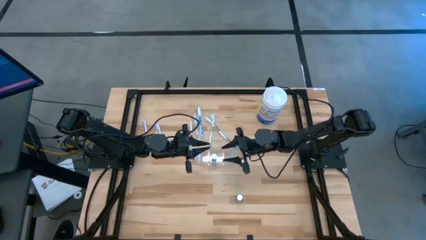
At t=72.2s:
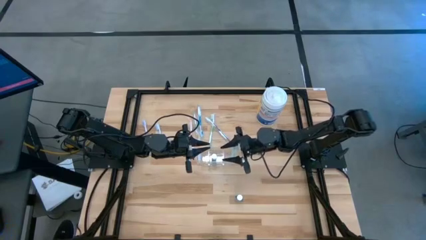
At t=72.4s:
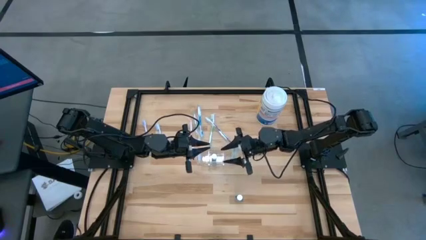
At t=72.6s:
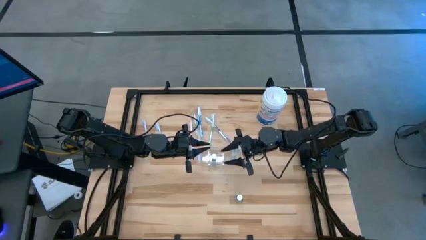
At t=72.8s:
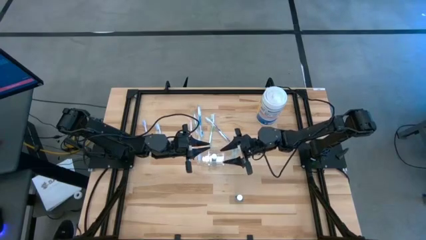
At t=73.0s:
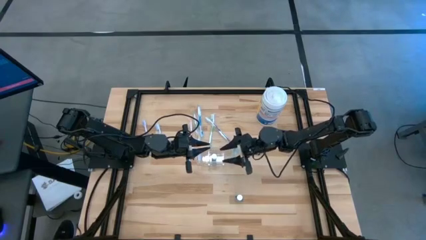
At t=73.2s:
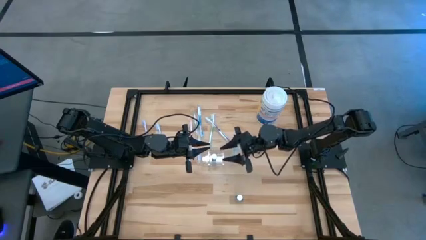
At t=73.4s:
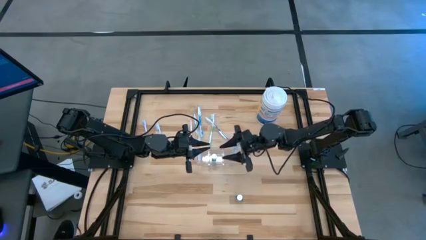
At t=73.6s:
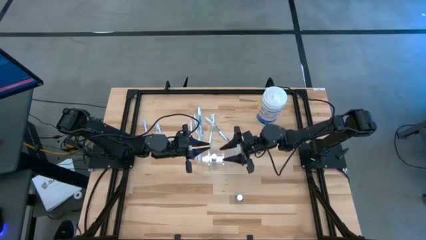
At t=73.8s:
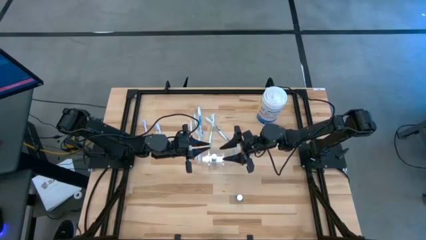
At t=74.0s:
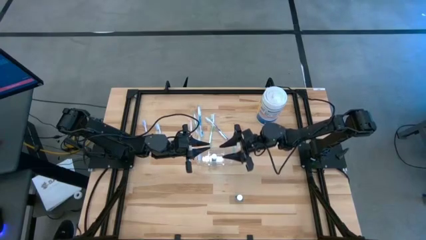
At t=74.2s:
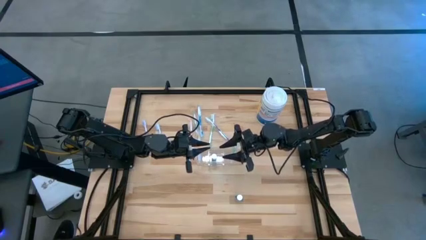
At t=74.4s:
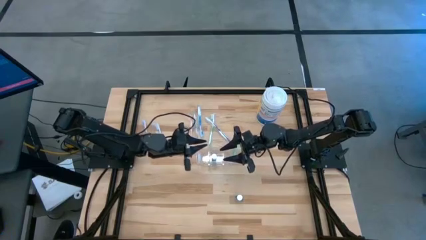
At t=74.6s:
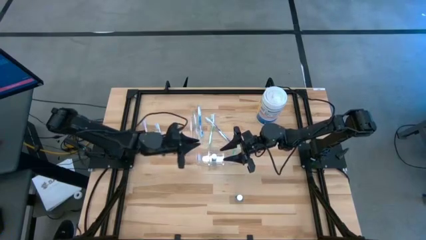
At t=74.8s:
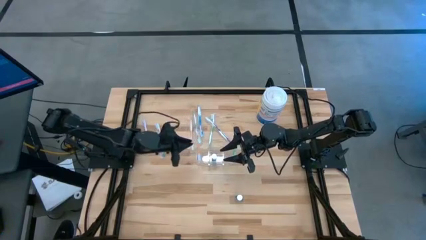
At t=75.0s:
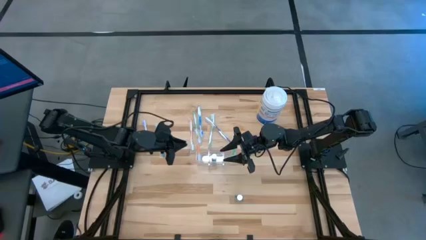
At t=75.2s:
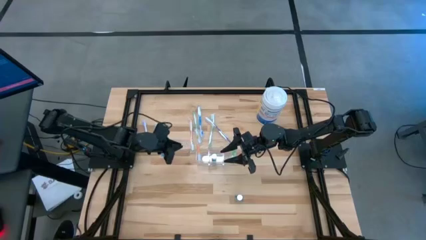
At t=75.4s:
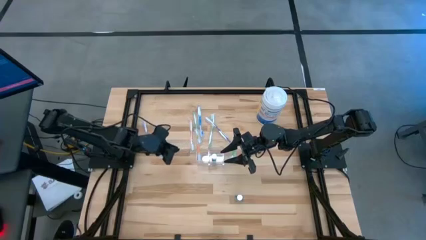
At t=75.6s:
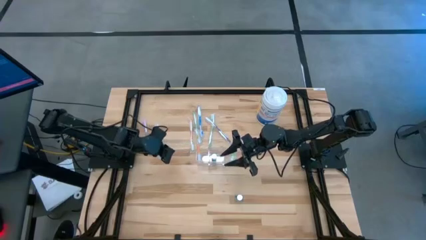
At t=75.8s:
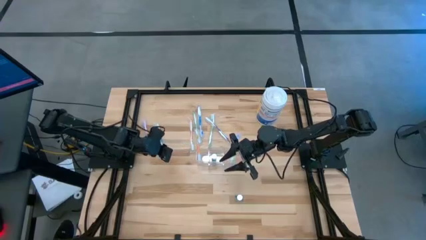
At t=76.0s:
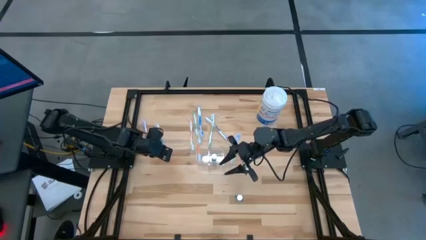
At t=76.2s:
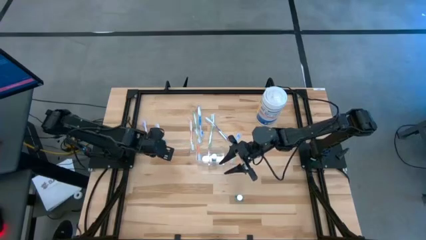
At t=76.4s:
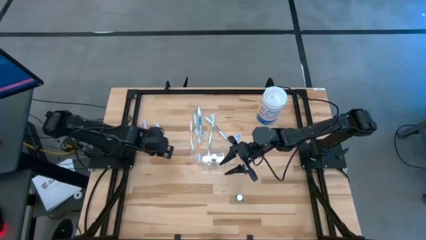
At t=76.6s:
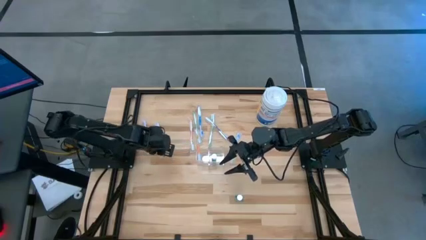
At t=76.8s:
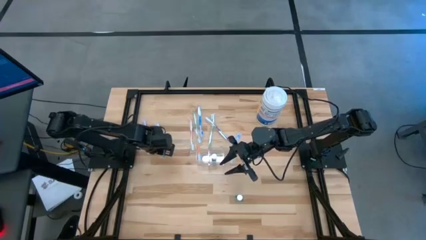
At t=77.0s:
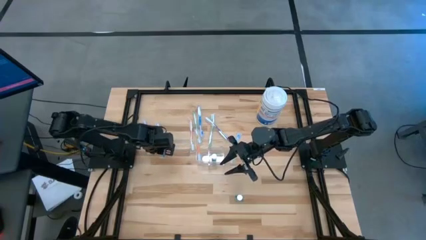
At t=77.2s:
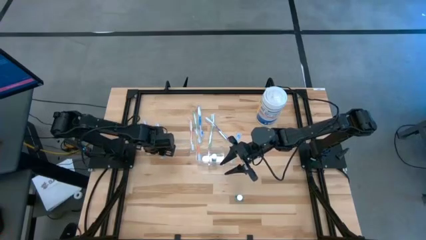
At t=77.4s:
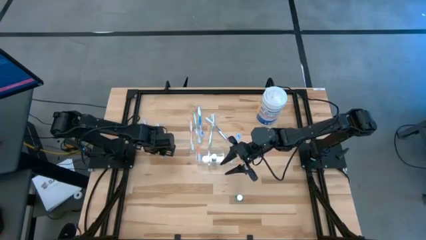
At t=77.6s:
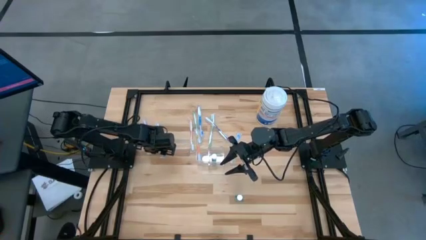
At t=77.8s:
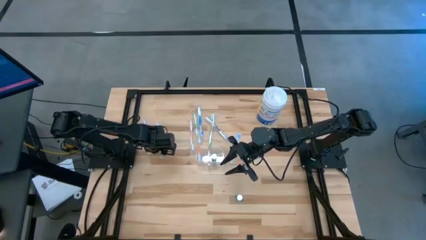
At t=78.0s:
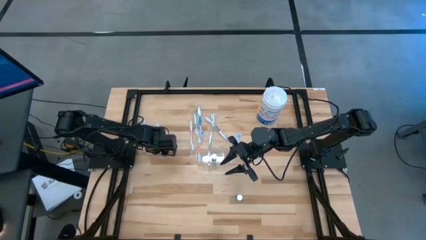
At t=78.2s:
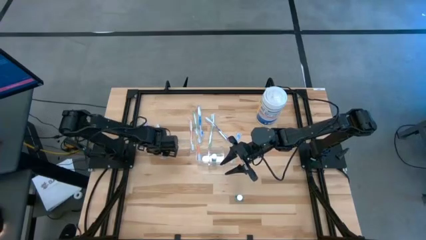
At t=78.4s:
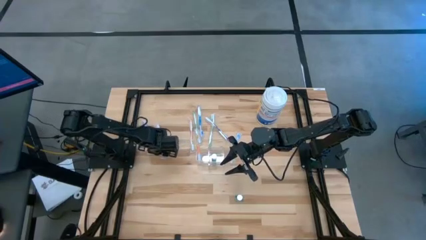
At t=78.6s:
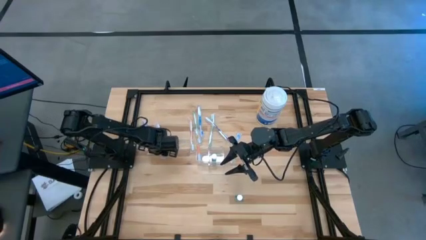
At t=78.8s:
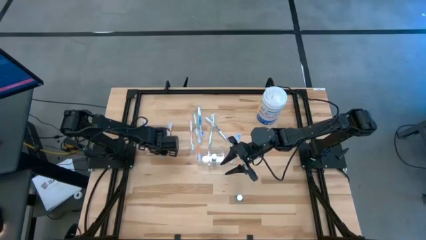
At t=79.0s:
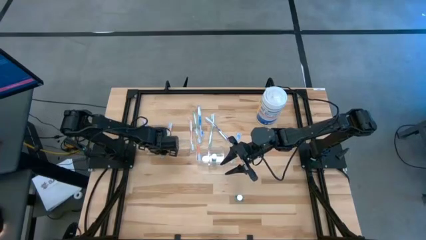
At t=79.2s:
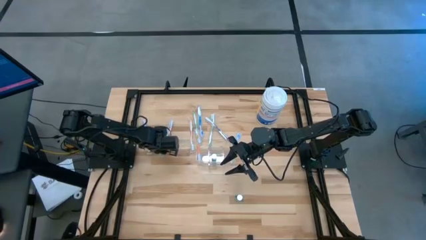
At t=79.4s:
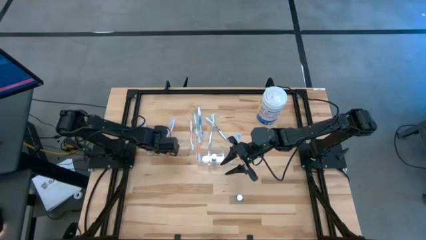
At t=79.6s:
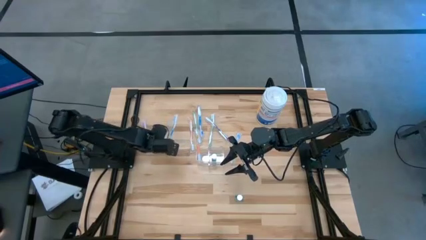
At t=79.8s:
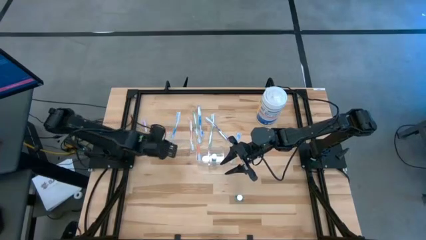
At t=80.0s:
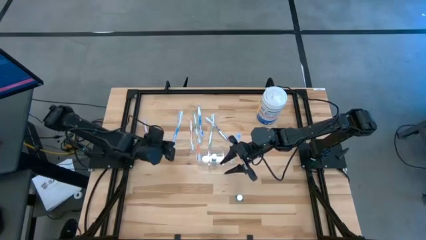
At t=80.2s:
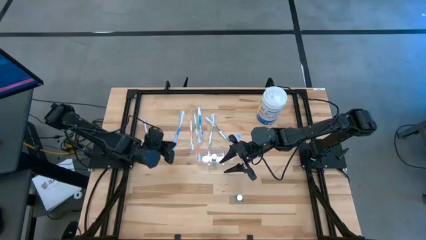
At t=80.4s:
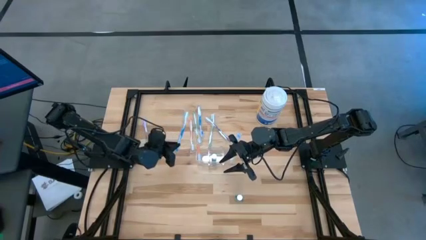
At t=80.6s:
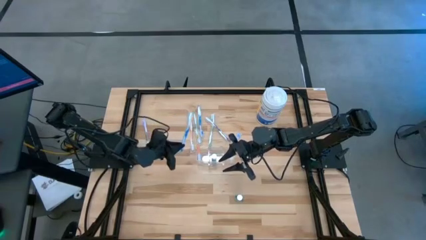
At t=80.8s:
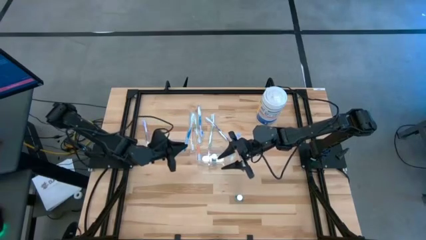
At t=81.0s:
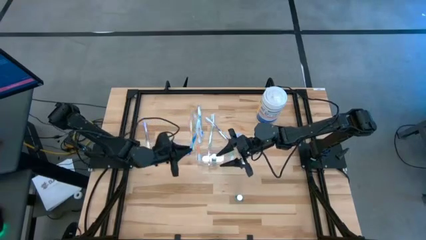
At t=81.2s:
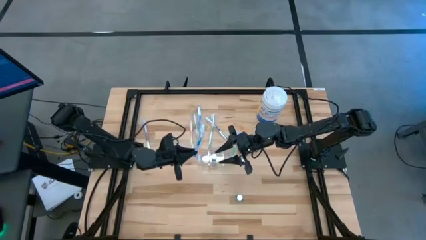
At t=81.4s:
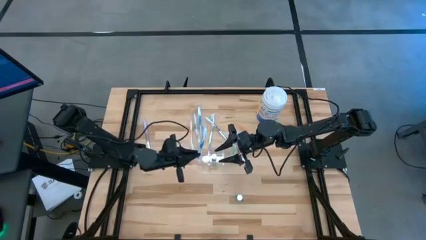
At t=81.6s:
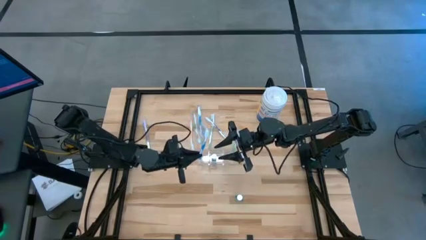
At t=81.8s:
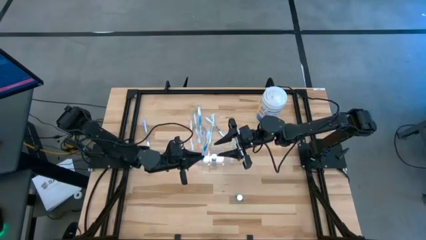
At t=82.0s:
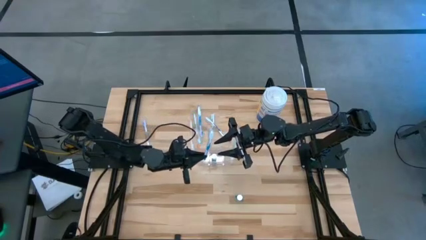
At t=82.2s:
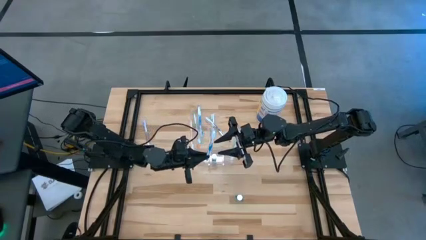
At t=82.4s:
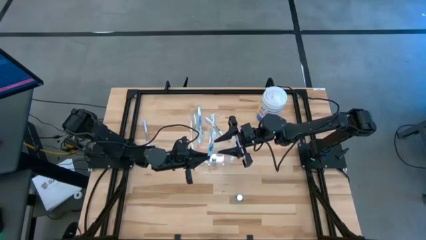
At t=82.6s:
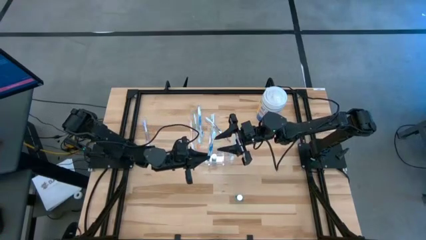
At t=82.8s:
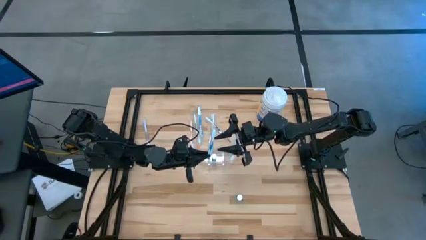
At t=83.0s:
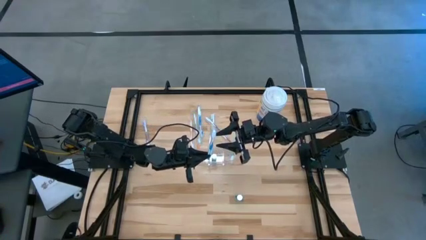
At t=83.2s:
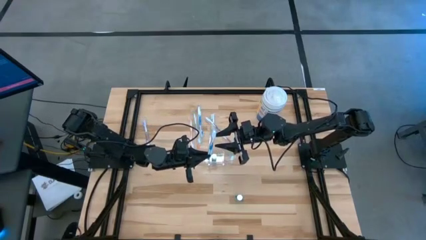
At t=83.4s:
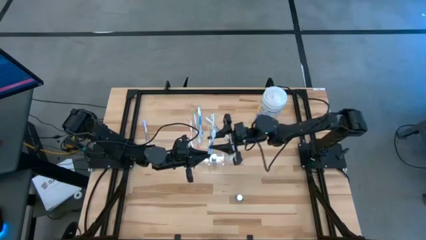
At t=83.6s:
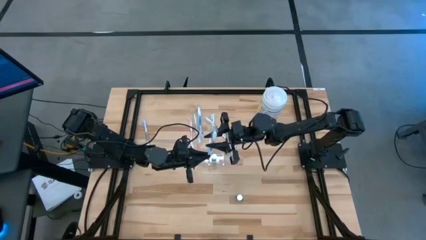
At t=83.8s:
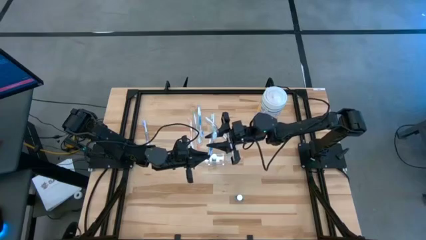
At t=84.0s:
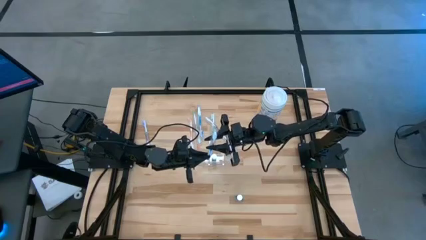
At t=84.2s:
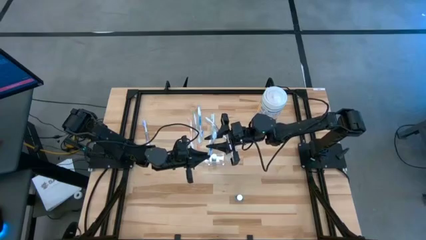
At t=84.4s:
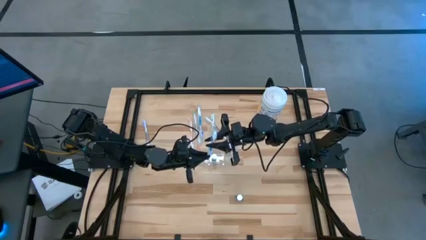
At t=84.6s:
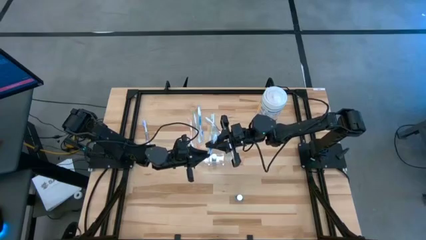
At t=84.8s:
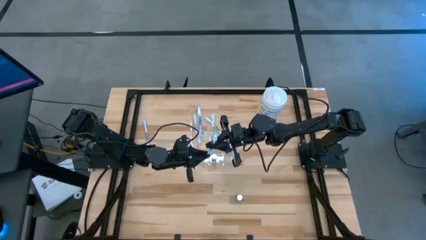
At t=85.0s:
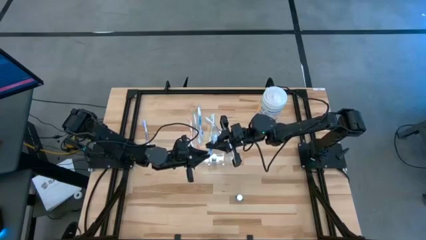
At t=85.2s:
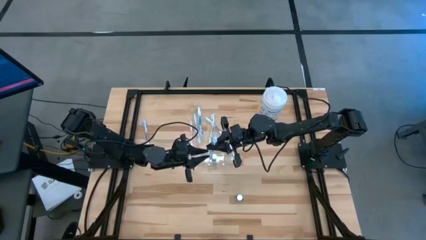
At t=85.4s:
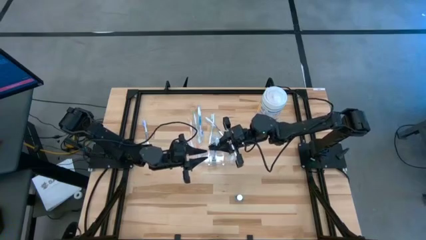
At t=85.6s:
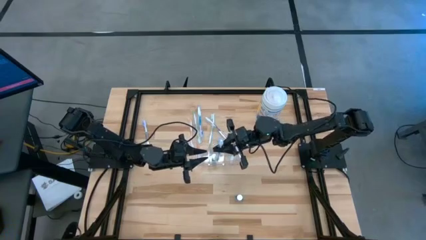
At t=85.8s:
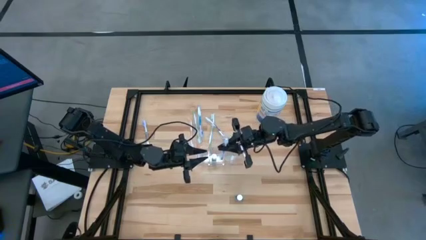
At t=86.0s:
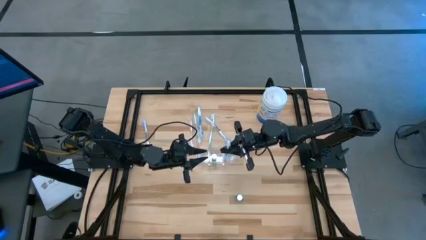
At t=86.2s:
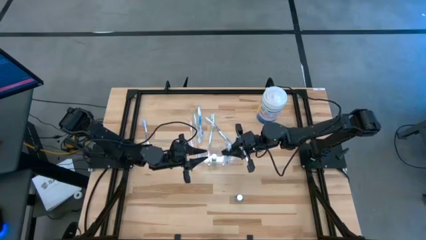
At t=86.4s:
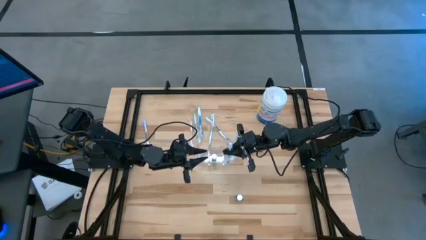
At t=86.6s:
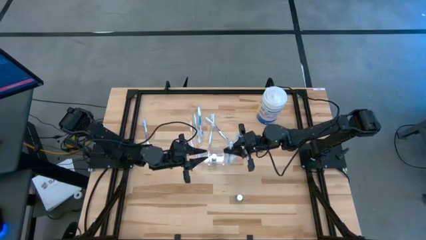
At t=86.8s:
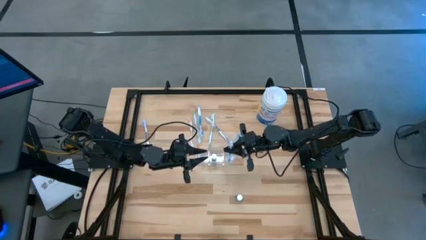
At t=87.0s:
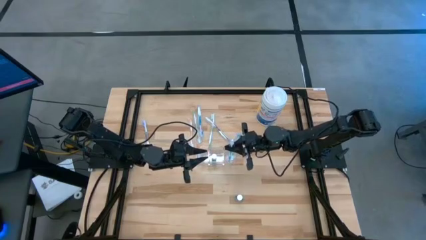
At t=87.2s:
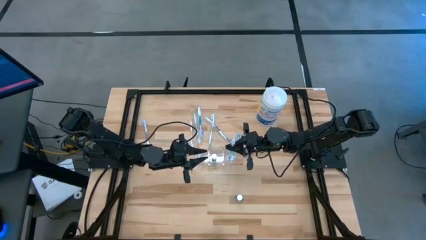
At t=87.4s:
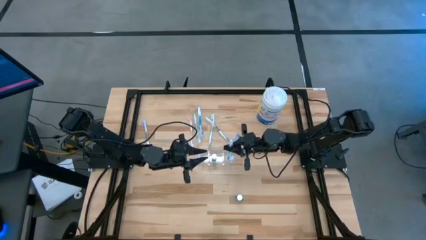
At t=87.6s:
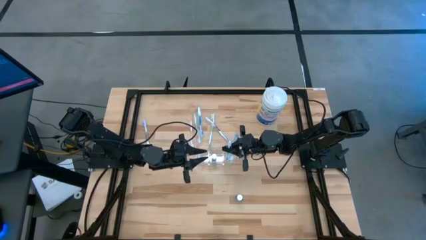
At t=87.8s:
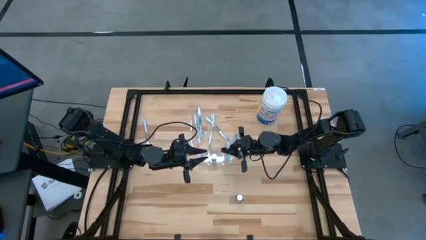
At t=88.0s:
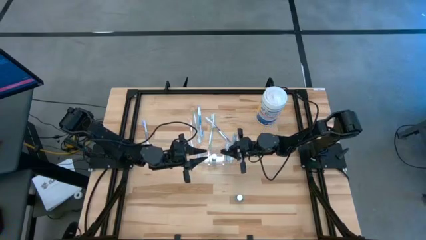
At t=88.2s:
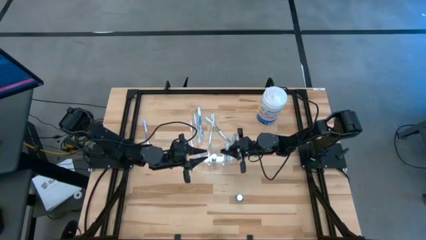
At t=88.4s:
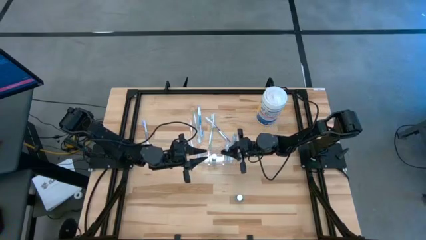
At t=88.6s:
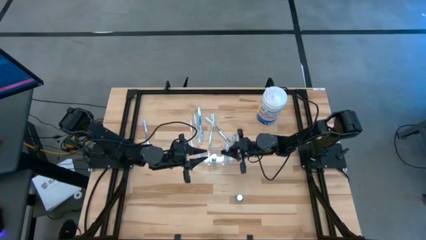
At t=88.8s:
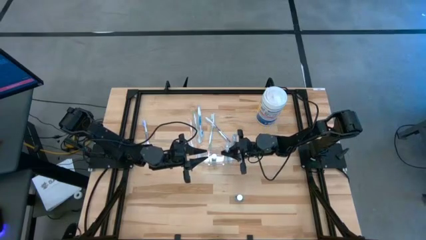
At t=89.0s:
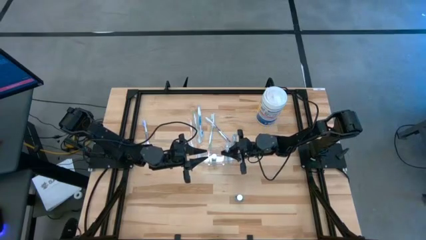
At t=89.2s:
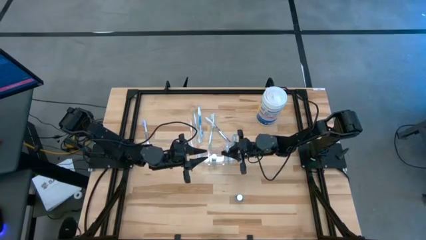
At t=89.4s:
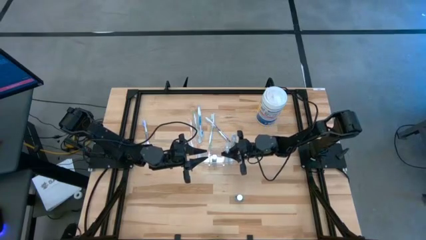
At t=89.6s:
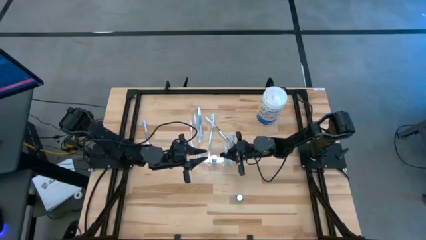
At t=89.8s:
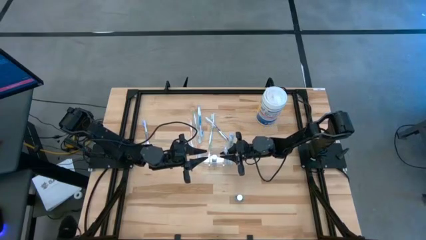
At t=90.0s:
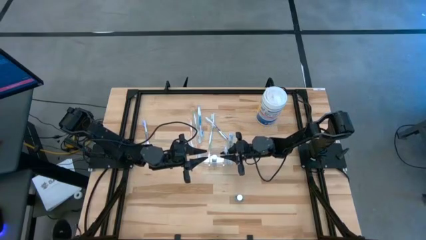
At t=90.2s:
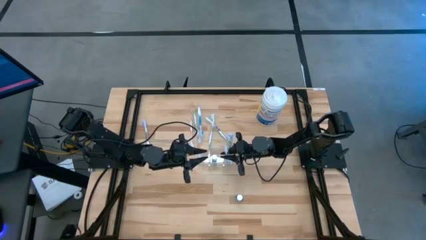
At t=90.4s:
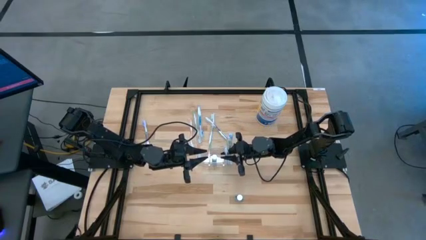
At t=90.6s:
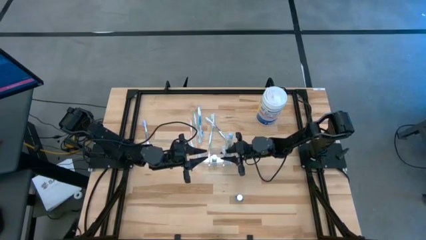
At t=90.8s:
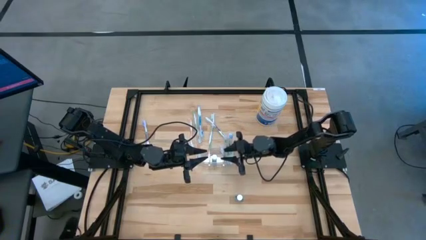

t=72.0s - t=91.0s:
Task: Pick & Place toothbrushing station
Put the left blue toothbrush into the transparent organizer
